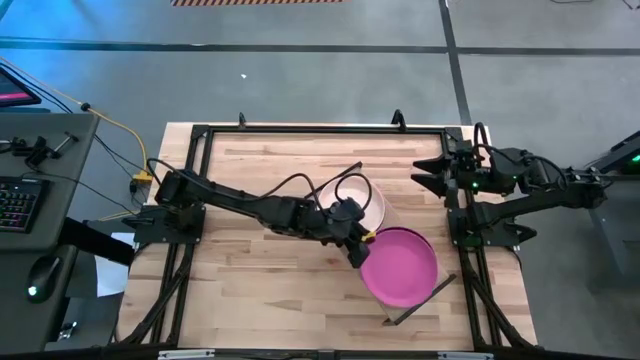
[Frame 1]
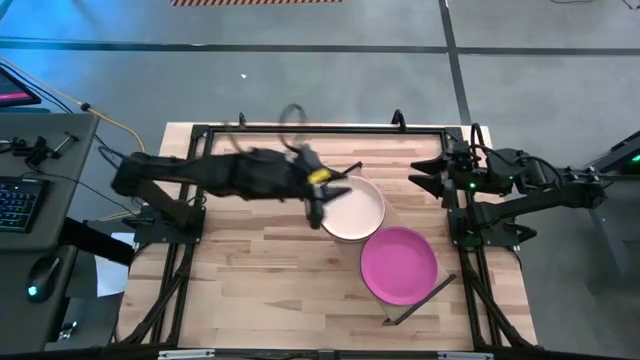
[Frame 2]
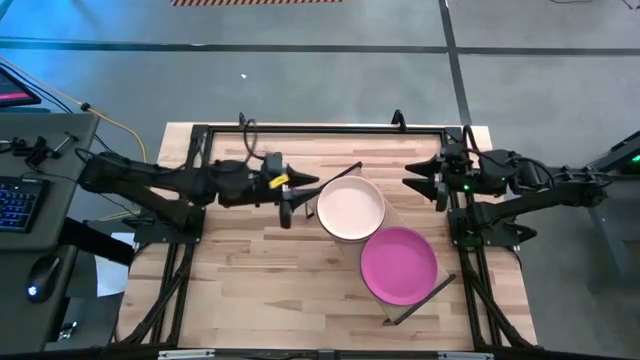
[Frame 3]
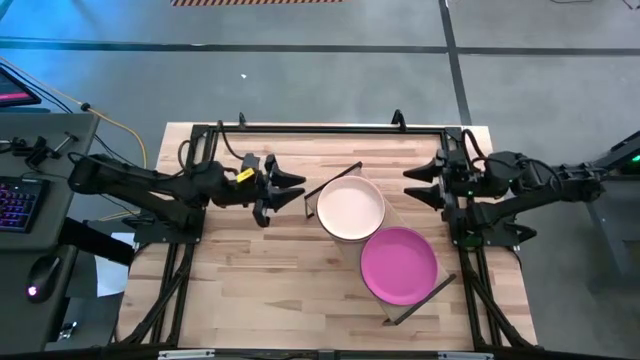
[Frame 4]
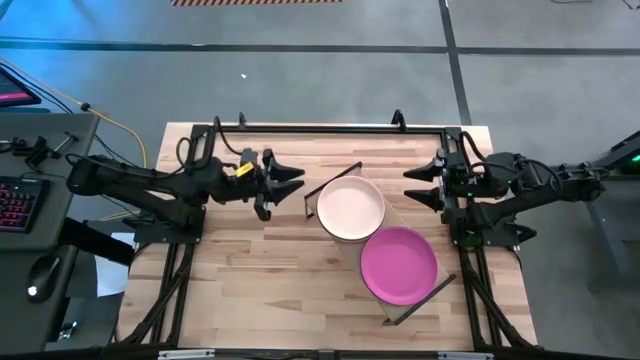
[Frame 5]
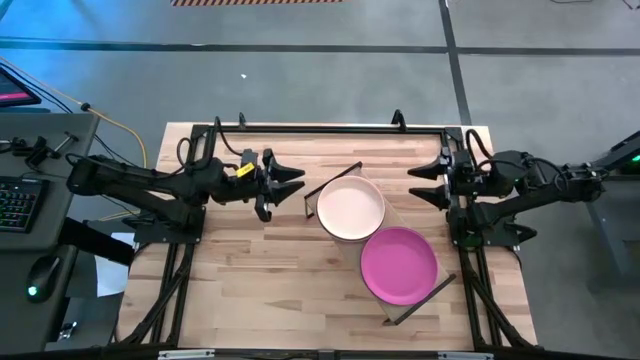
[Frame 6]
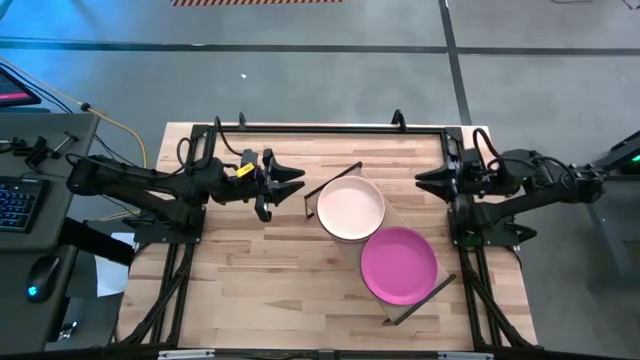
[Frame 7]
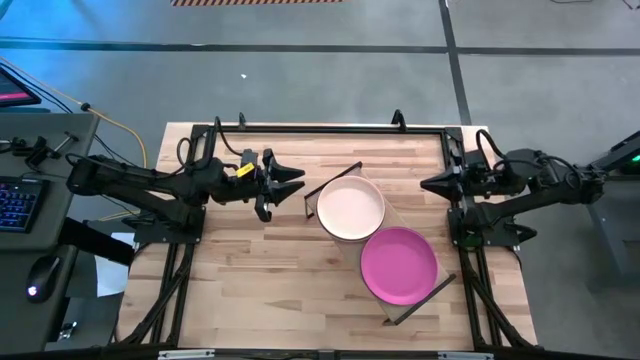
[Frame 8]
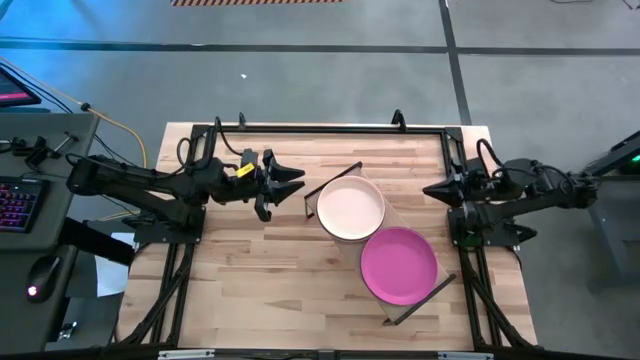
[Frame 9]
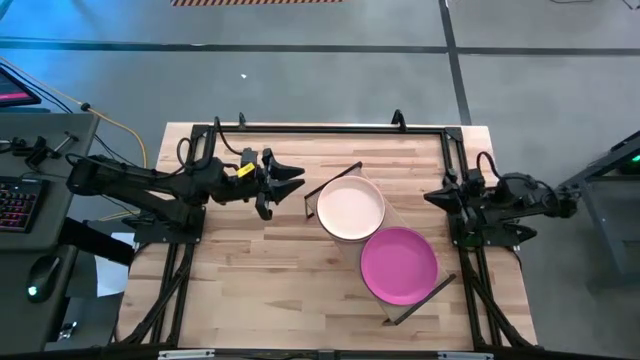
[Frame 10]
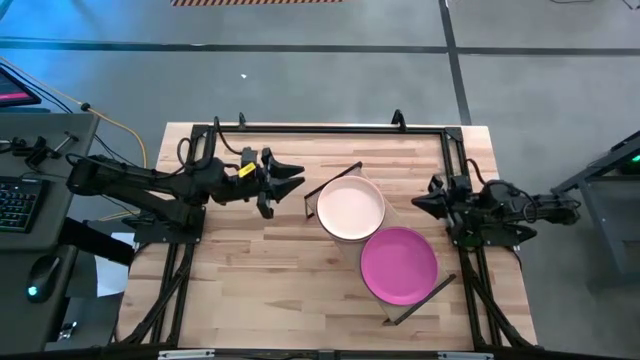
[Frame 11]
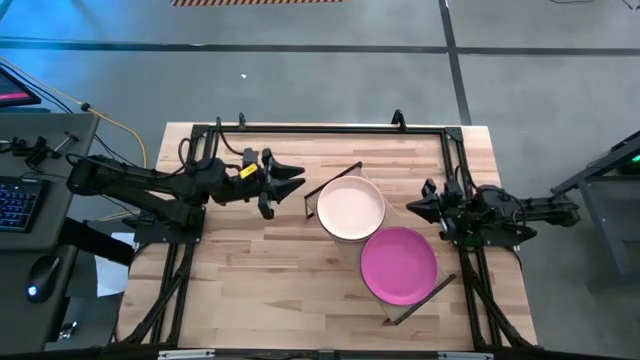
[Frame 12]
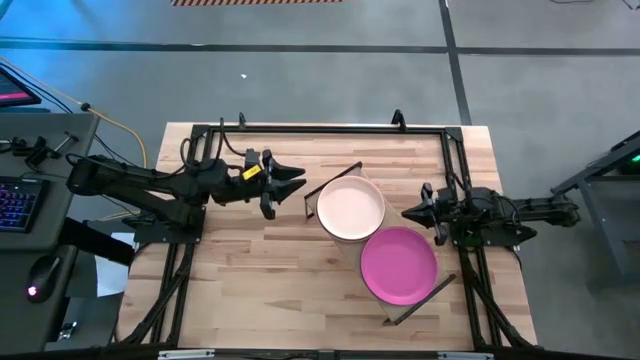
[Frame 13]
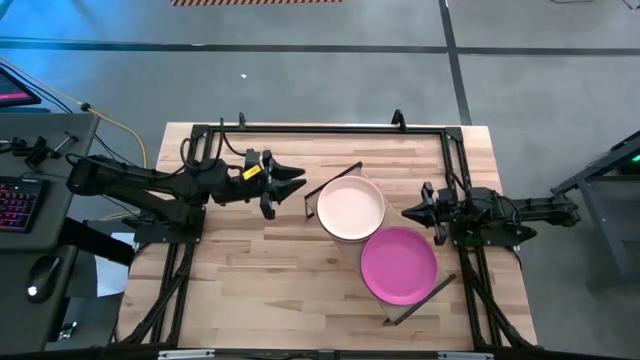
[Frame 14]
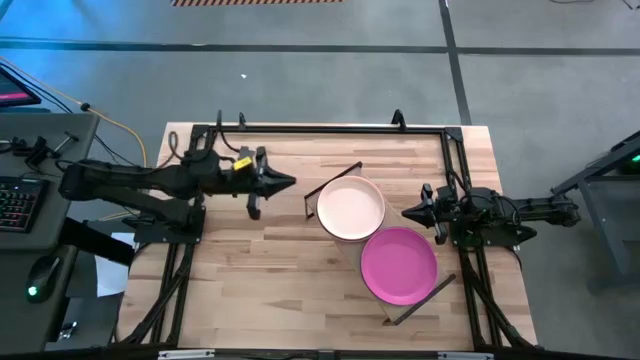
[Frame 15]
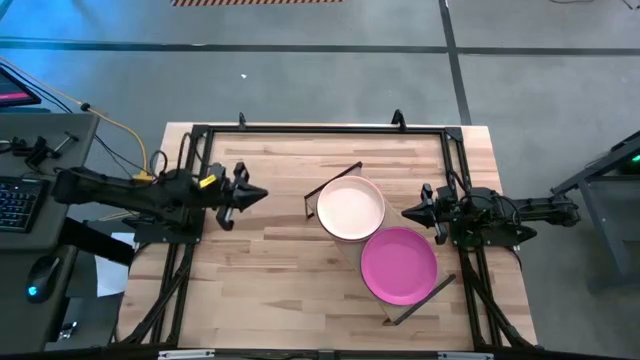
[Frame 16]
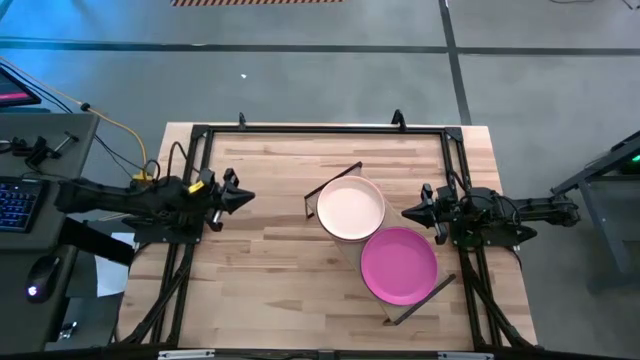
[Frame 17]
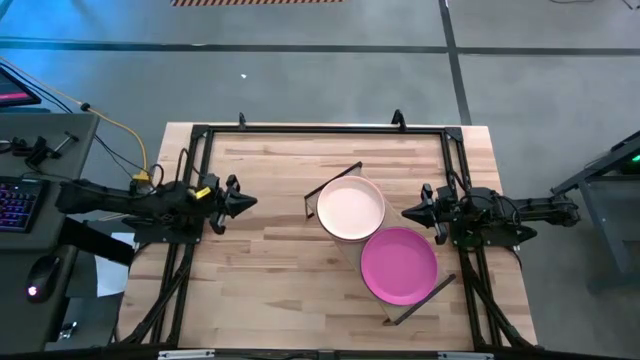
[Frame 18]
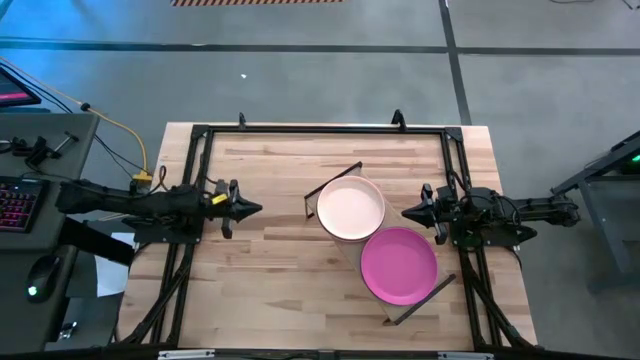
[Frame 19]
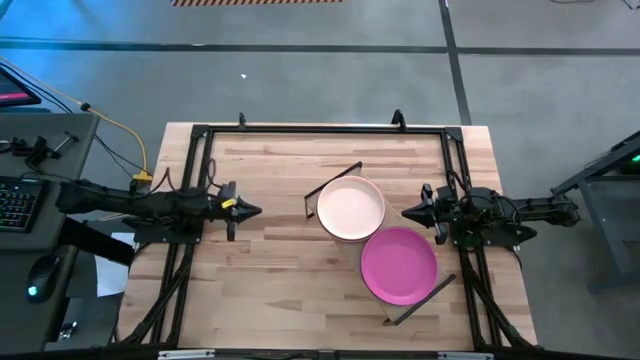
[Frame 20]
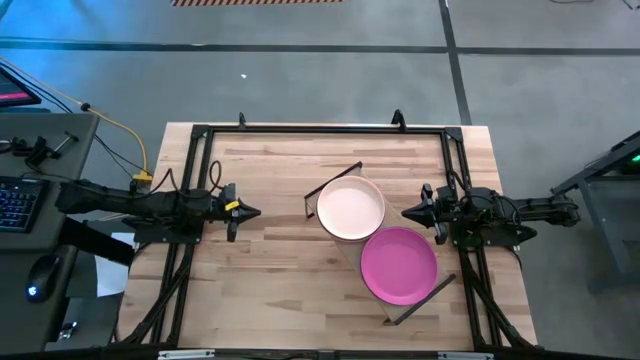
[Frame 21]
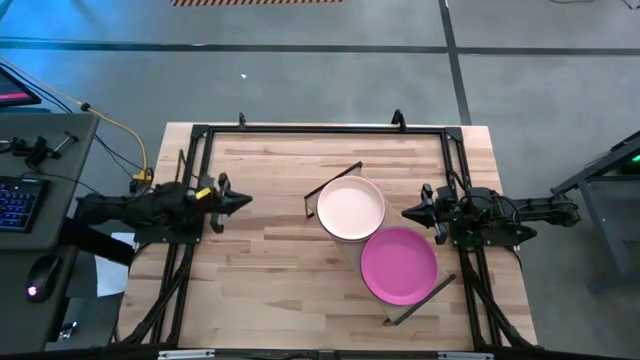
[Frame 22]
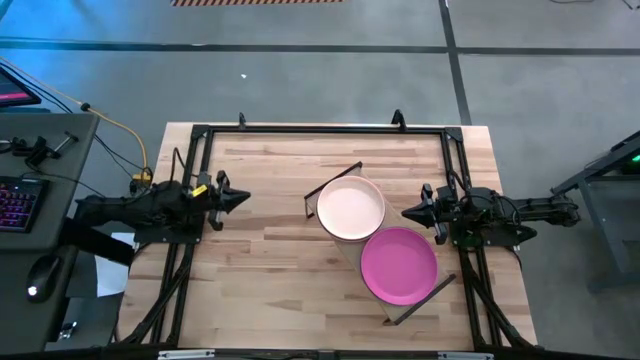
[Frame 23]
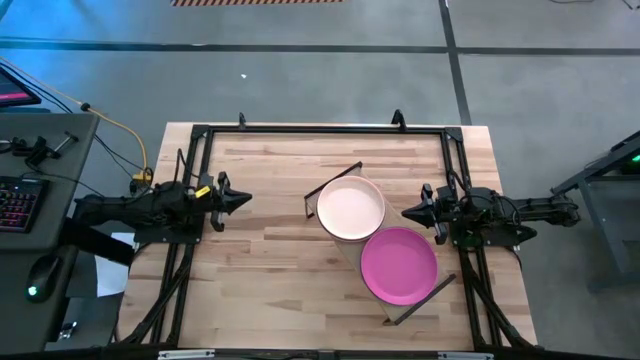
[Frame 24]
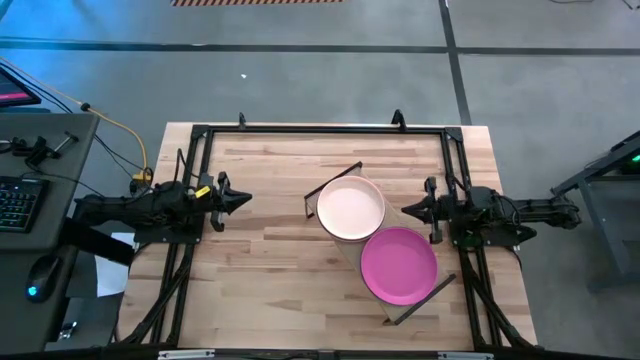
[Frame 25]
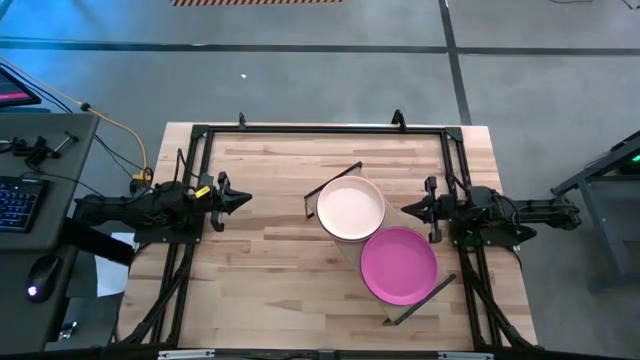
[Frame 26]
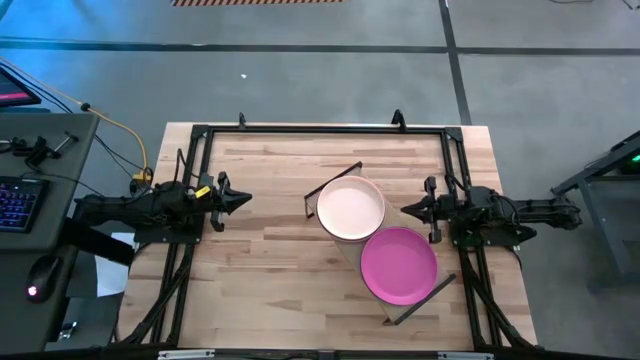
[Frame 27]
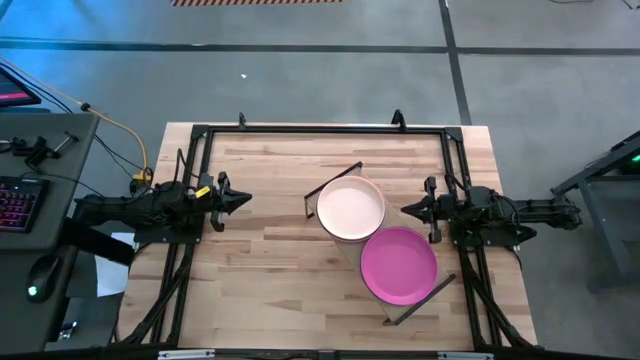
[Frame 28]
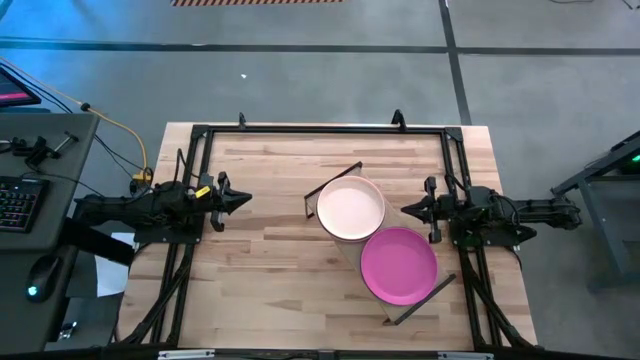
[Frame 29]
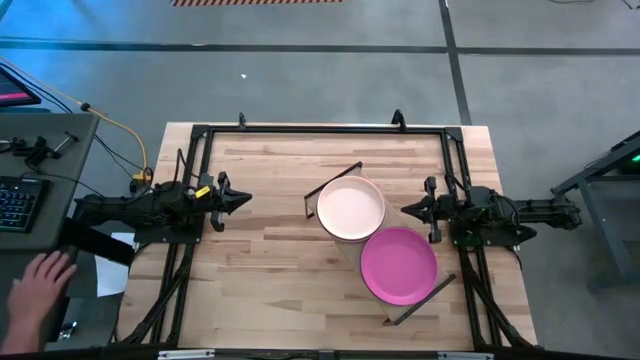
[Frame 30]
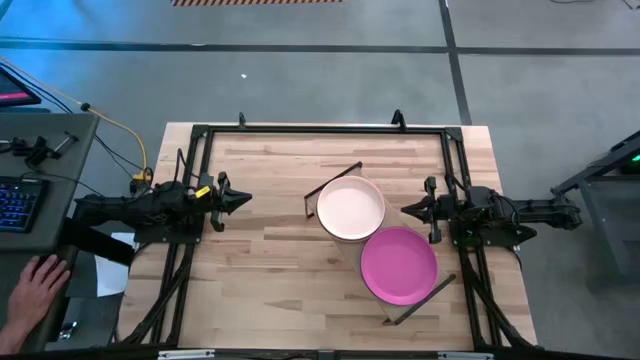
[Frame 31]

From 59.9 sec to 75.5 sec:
Task: Place and stack plates onto a shelf
Return to Home Position

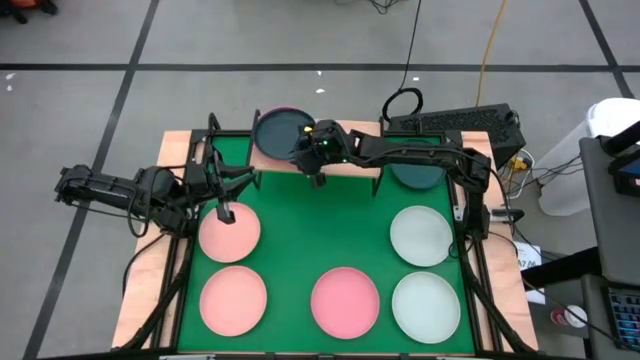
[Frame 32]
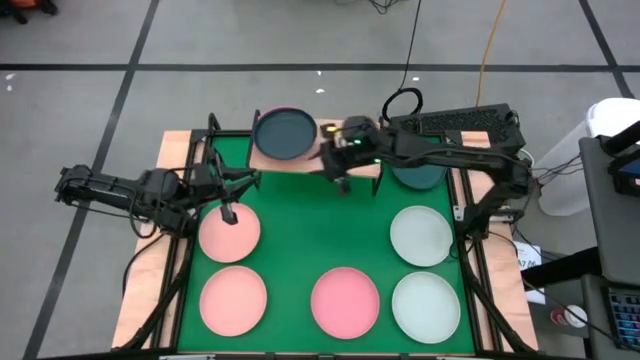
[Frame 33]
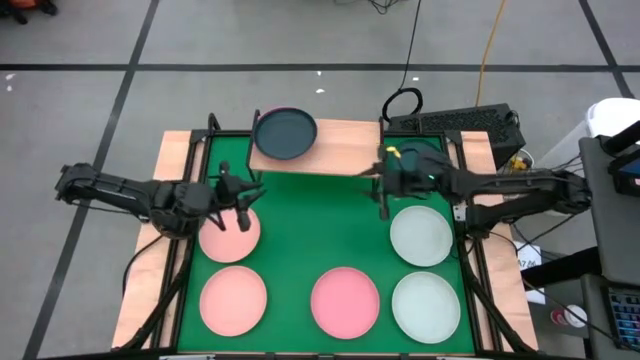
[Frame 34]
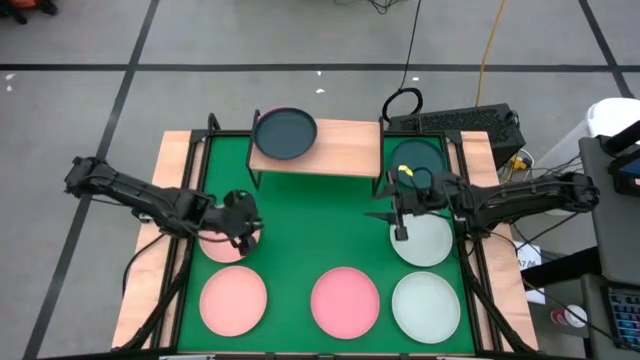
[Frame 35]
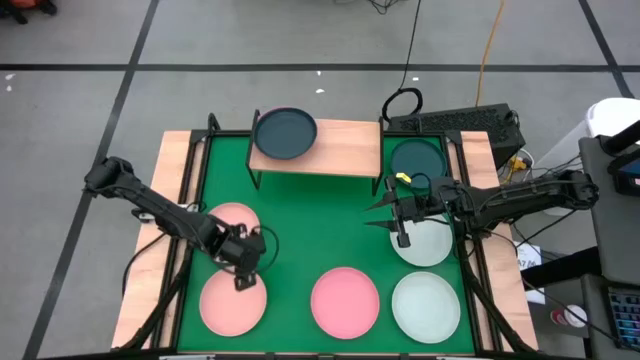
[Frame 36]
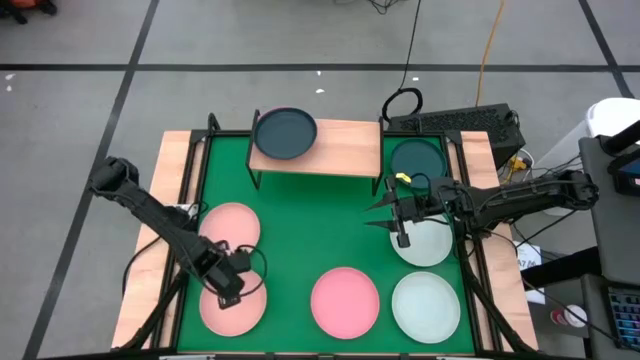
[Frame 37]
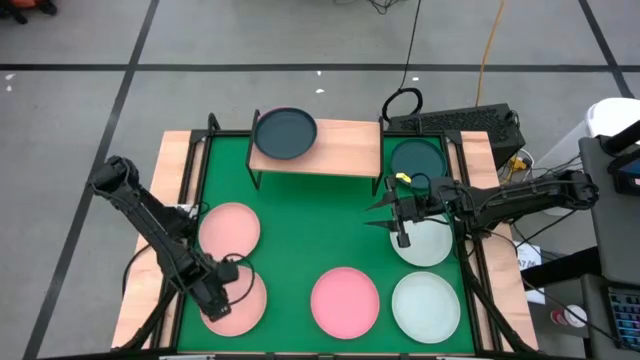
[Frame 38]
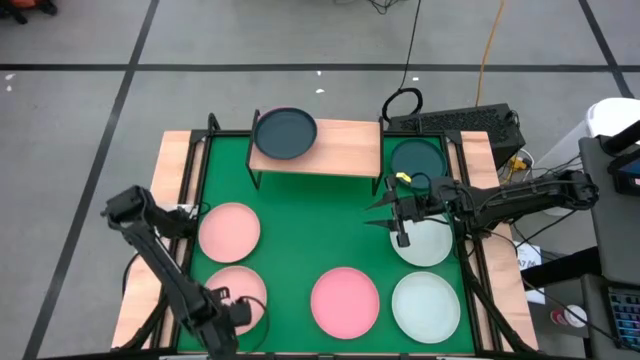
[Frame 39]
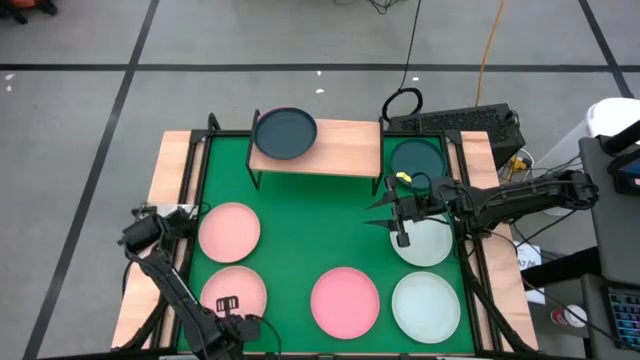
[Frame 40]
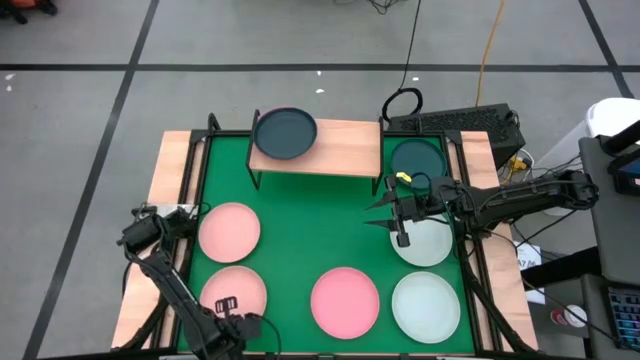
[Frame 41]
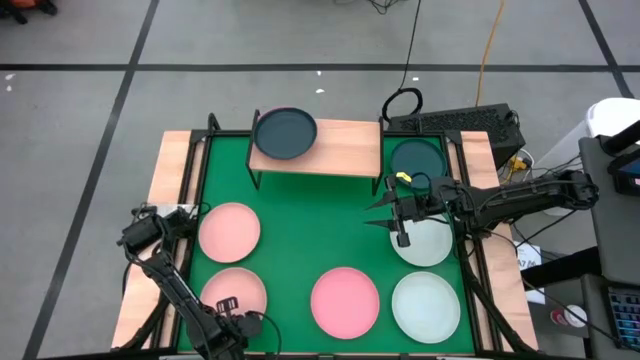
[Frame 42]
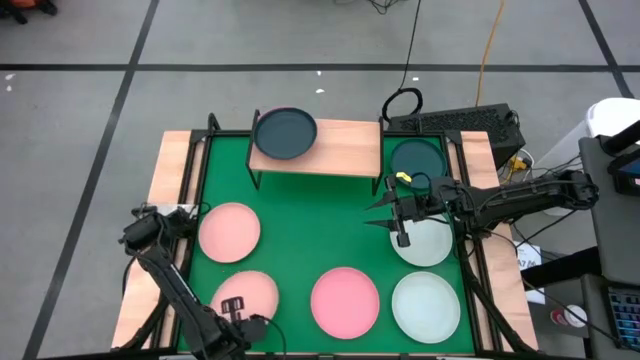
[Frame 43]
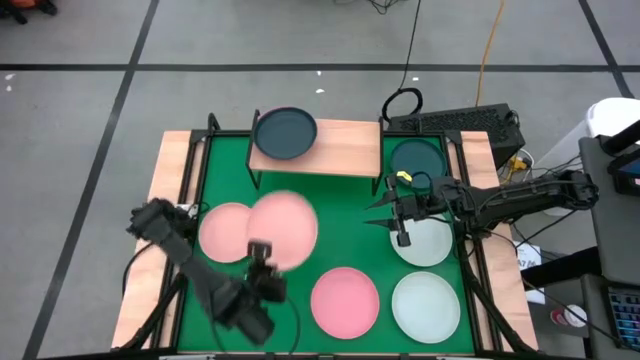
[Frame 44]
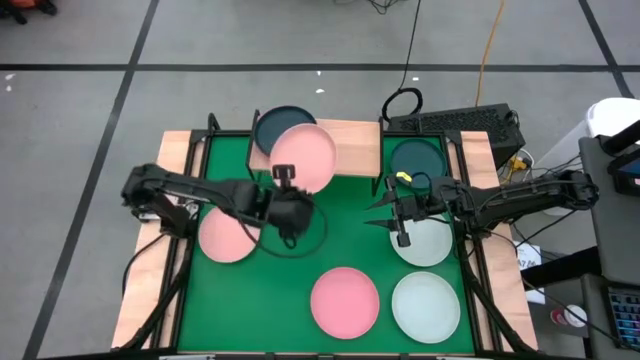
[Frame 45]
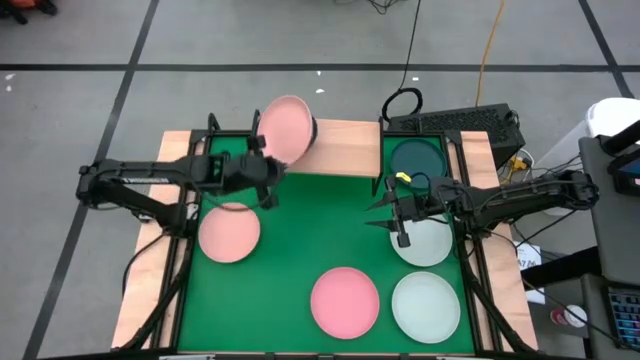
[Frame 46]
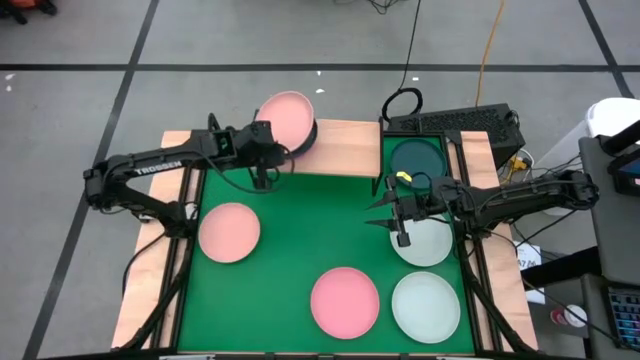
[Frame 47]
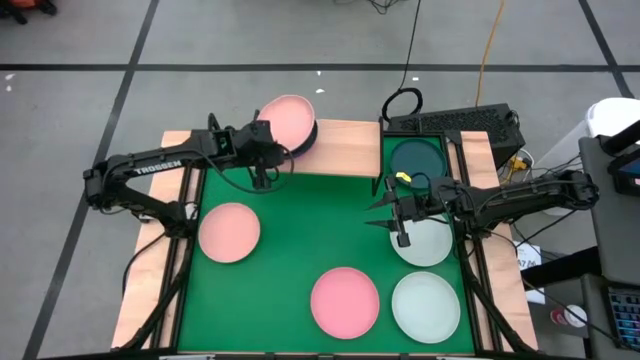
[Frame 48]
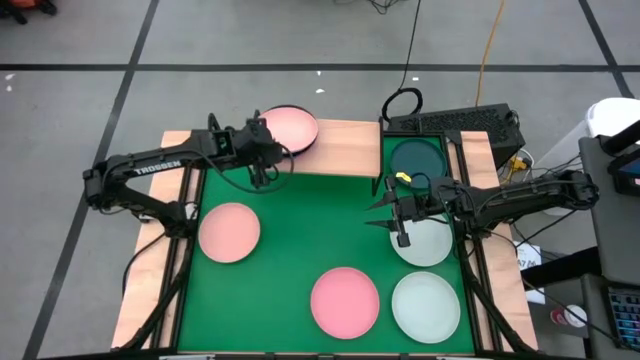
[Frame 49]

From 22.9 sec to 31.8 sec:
Task: Place and stack plates onto a shelf
Stack the bottom light pink plate on top of the black plate on the shelf
